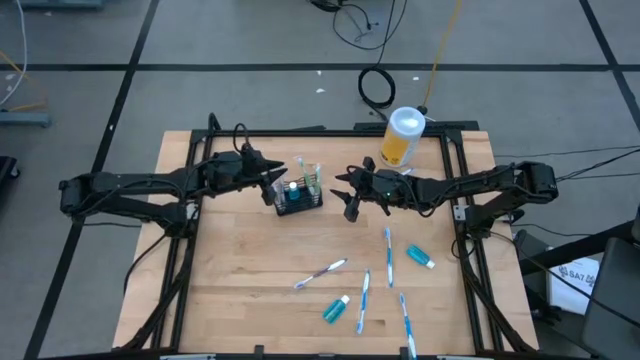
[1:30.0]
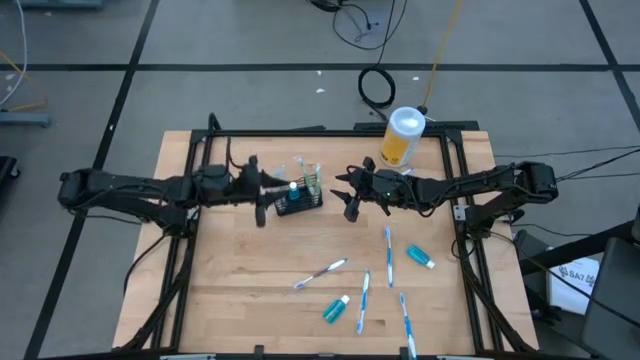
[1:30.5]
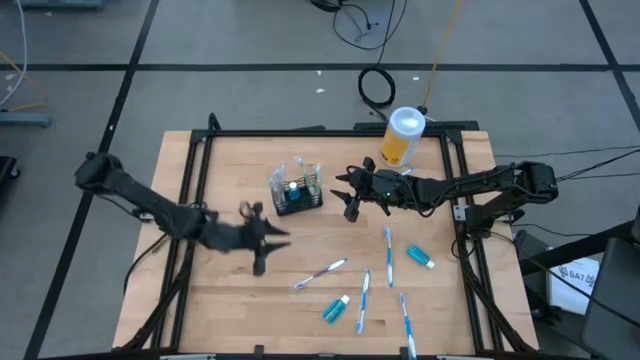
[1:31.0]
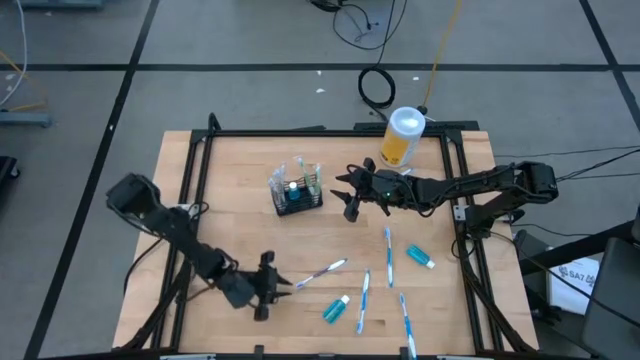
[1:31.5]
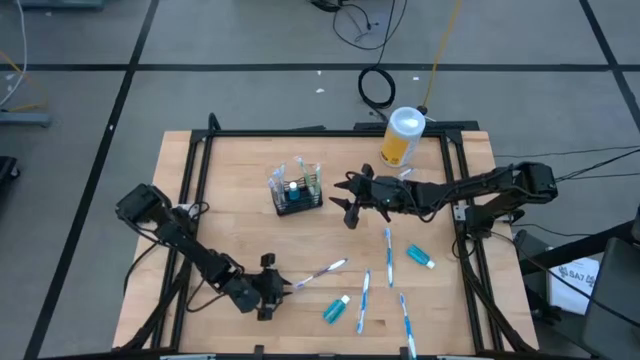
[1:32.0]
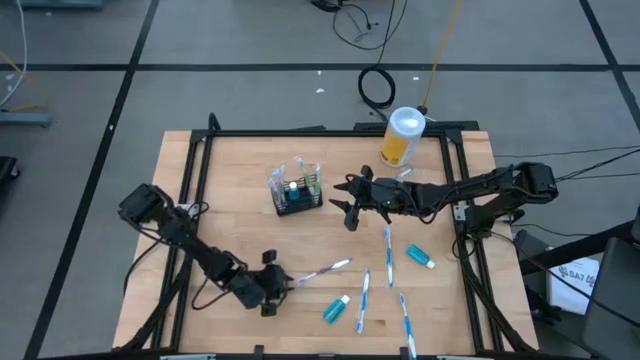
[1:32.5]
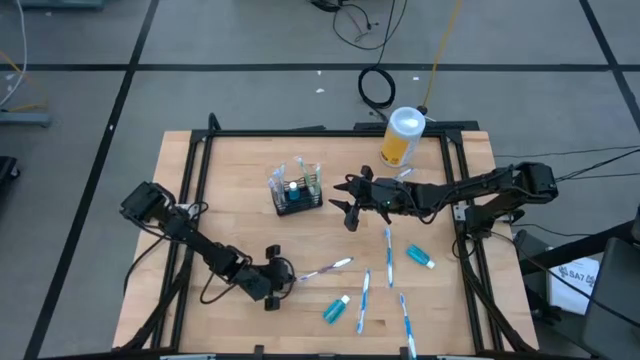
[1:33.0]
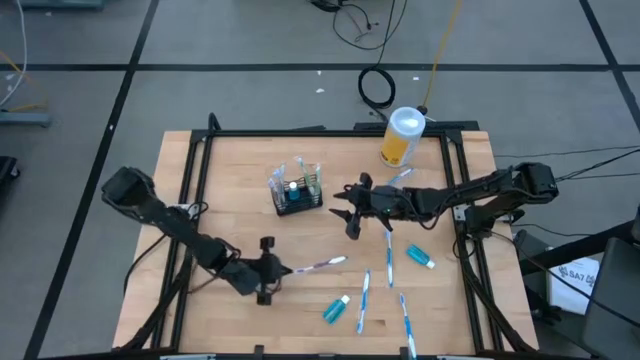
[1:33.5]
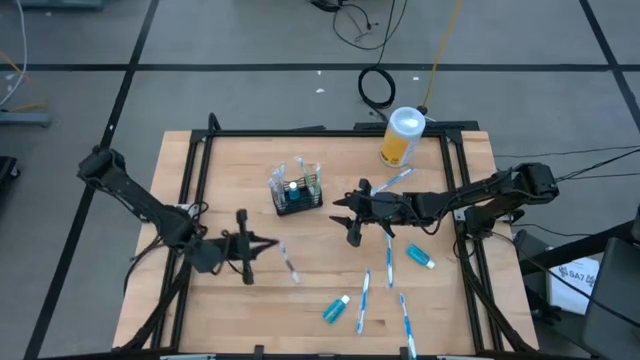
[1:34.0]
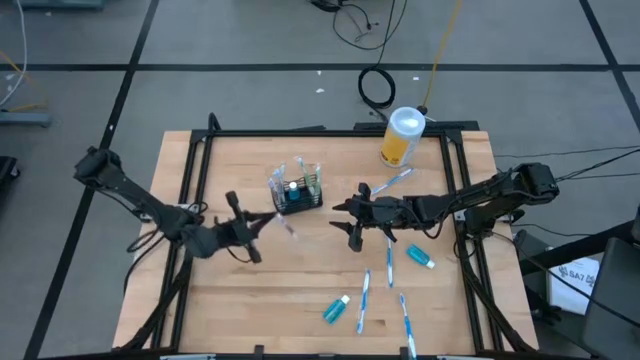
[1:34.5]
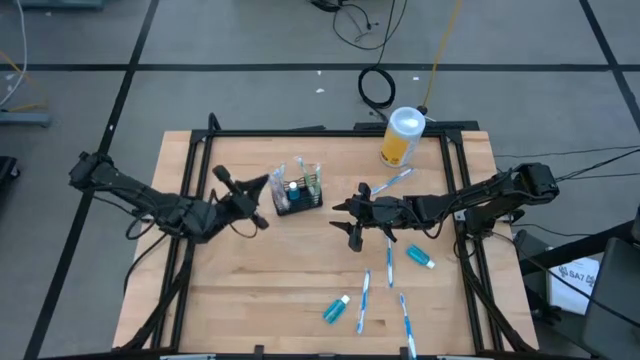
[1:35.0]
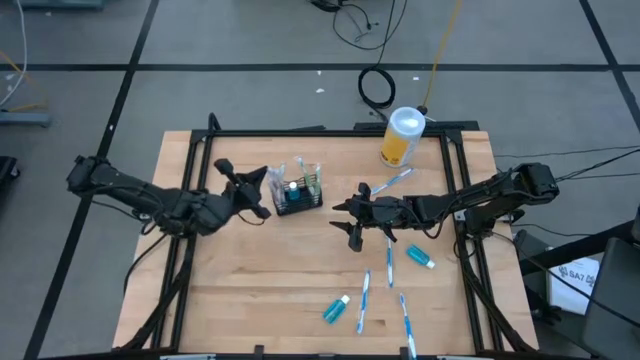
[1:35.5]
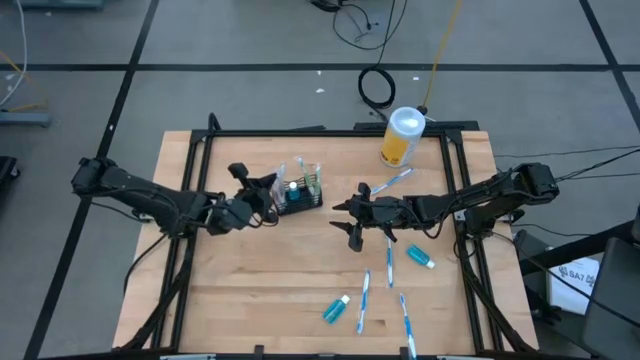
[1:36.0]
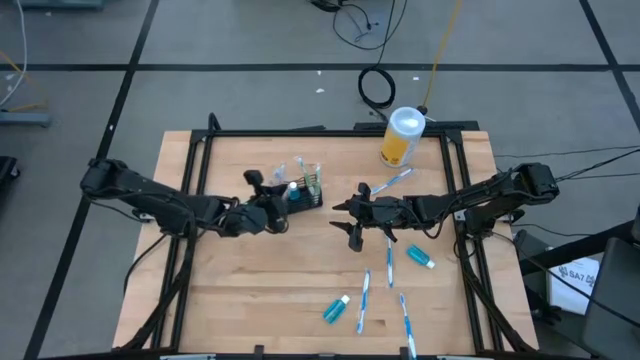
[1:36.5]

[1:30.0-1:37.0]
Task: Pick & Place toothbrushing station
Put the violet toothbrush into the black mesh organizer

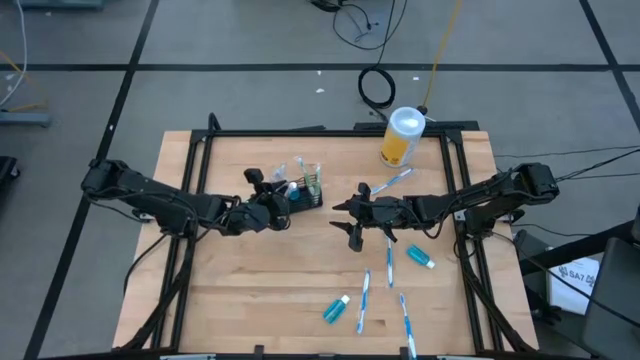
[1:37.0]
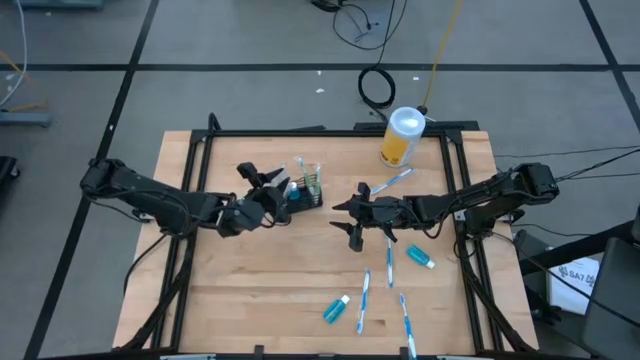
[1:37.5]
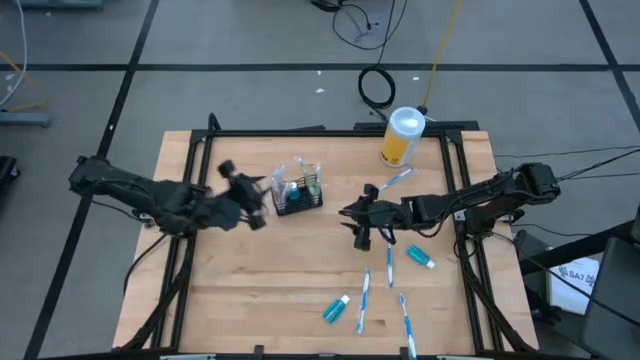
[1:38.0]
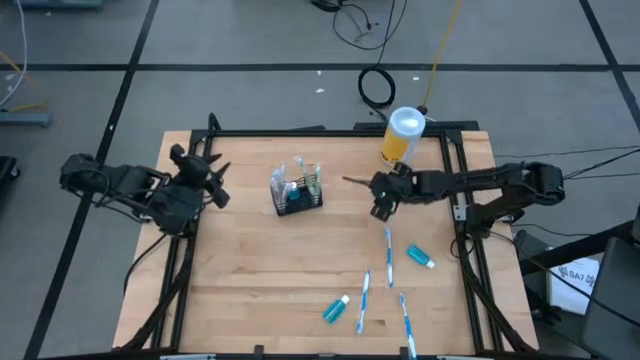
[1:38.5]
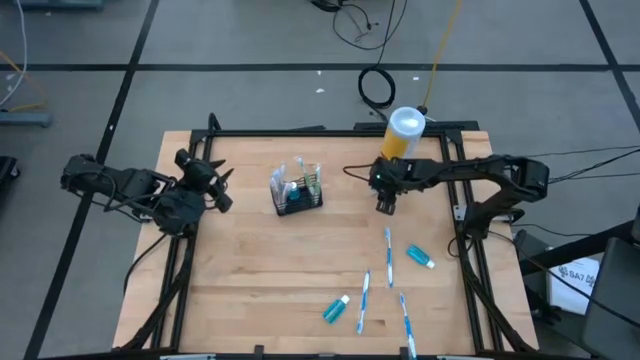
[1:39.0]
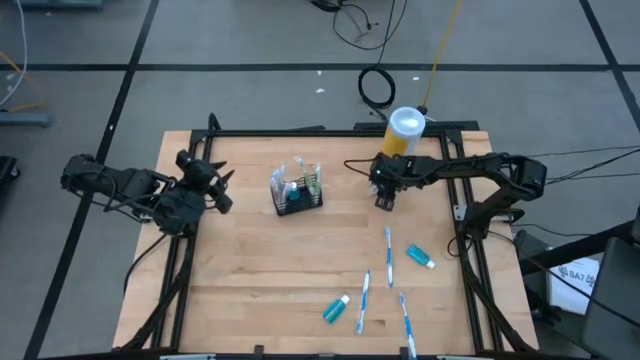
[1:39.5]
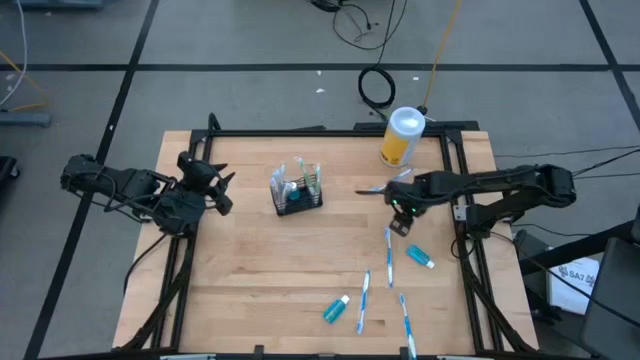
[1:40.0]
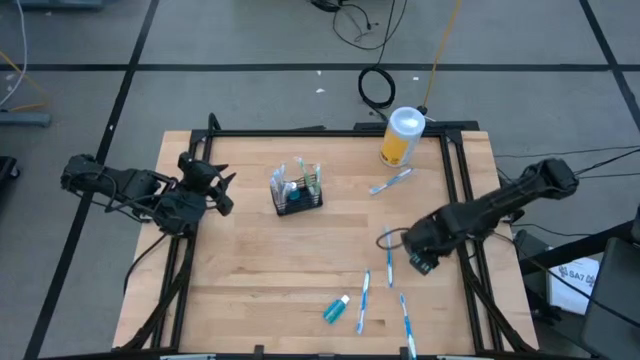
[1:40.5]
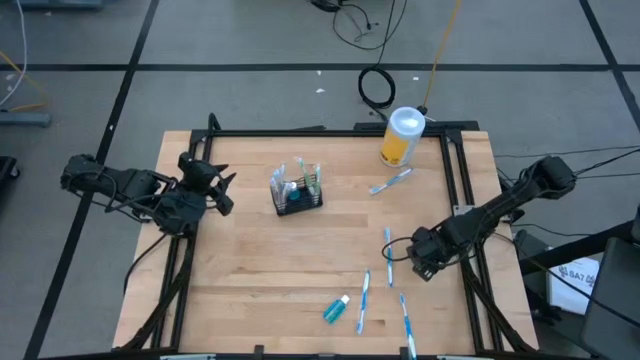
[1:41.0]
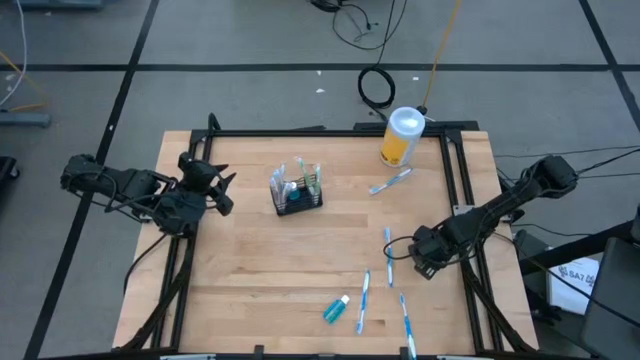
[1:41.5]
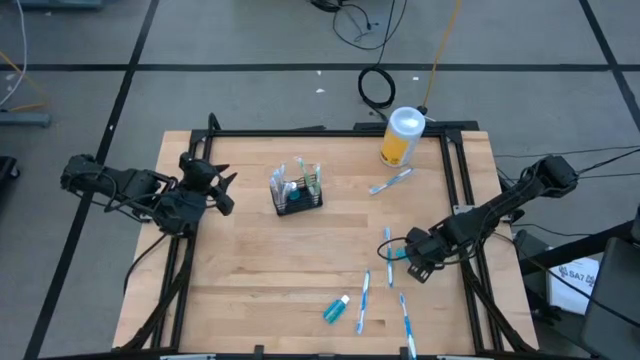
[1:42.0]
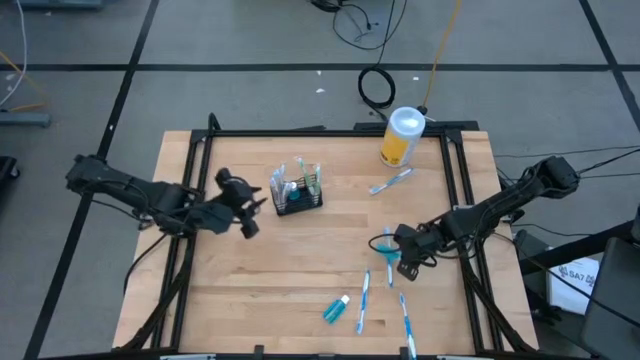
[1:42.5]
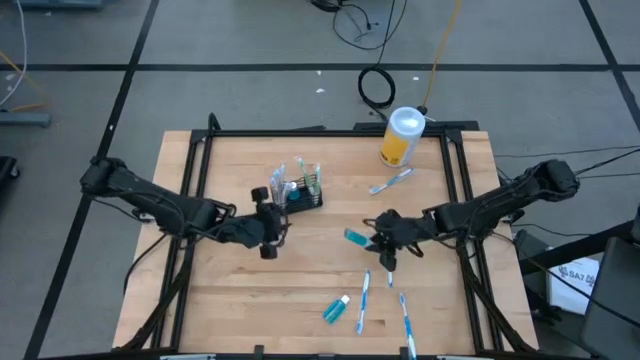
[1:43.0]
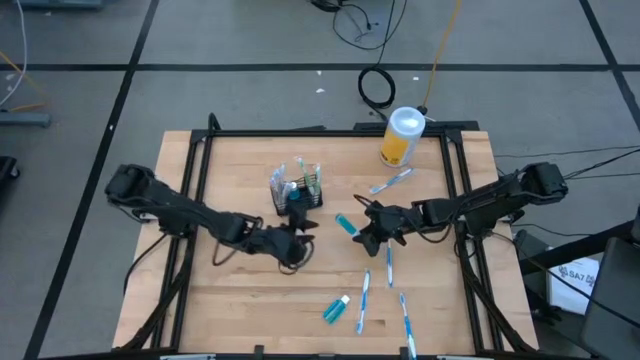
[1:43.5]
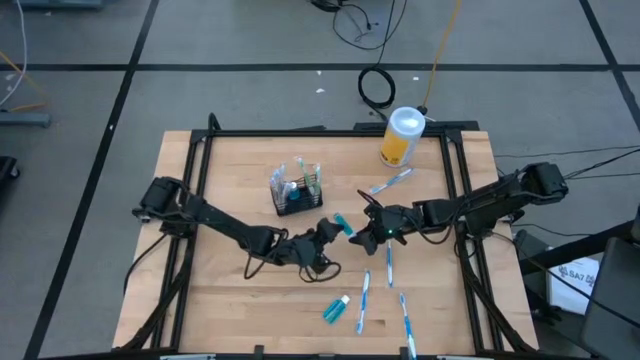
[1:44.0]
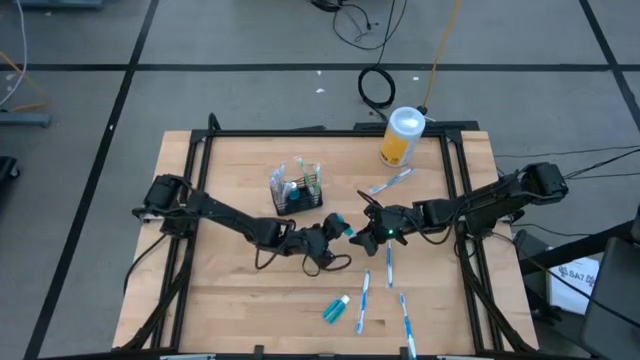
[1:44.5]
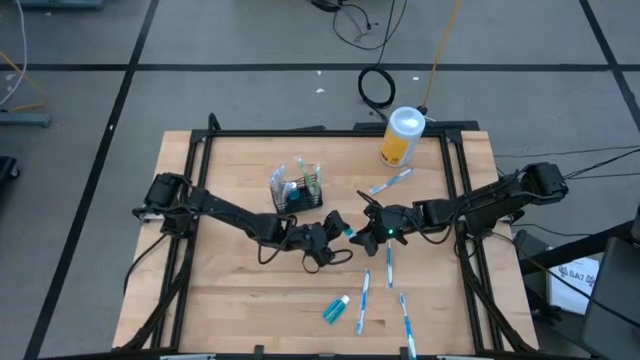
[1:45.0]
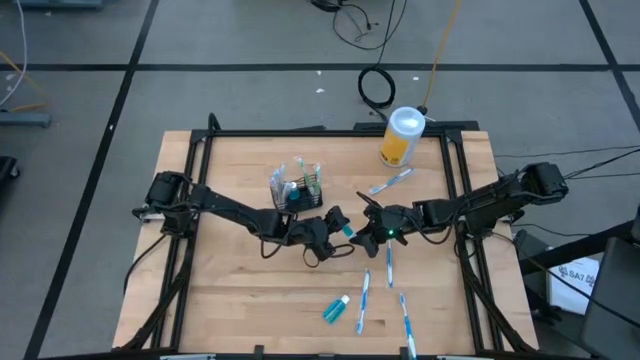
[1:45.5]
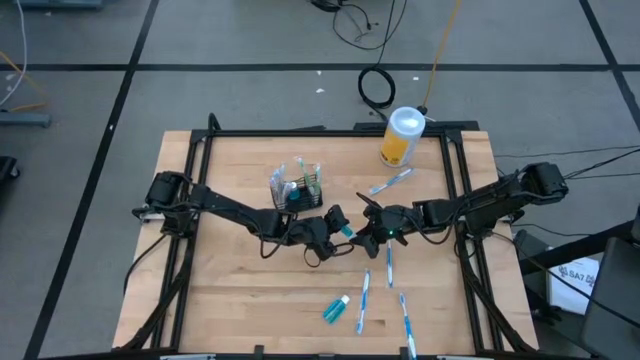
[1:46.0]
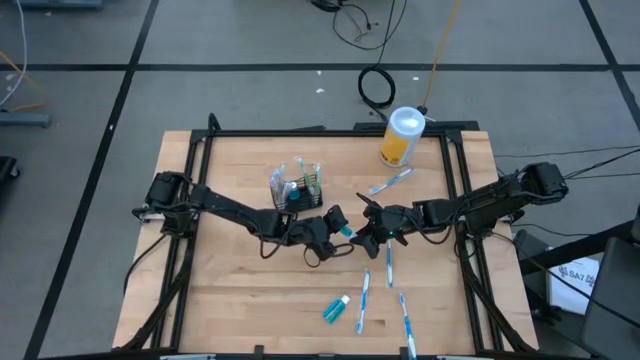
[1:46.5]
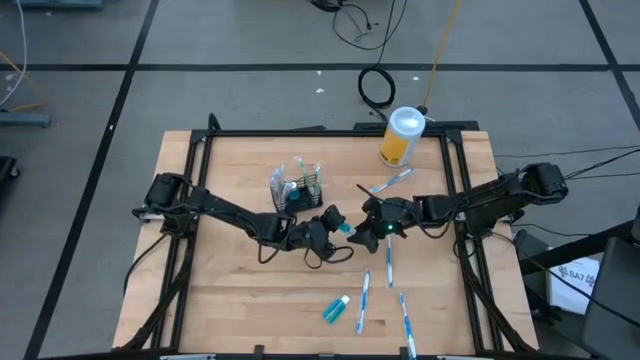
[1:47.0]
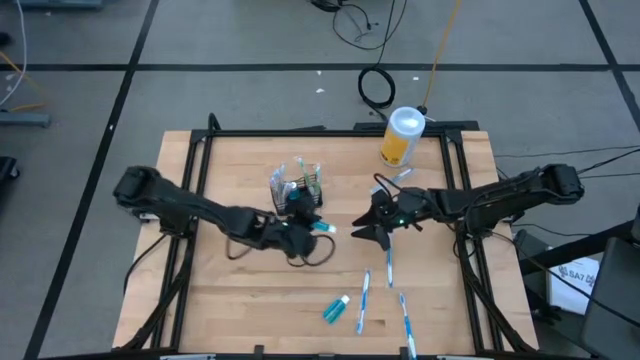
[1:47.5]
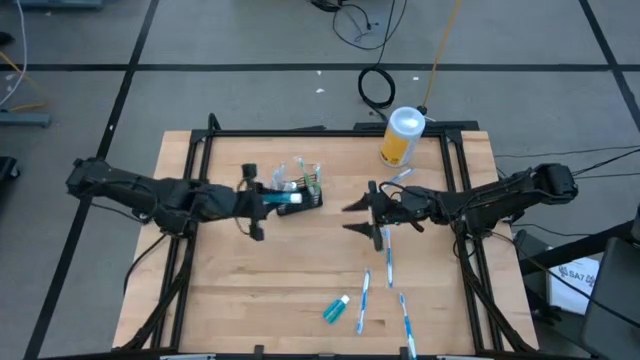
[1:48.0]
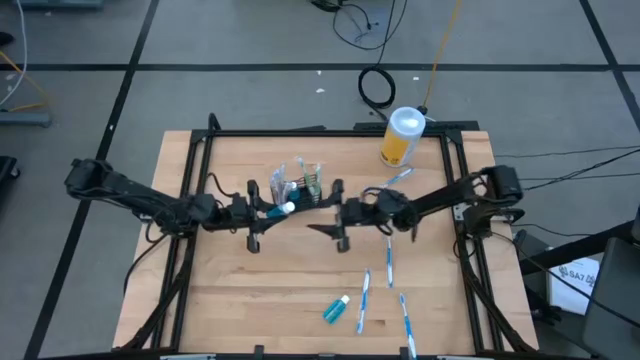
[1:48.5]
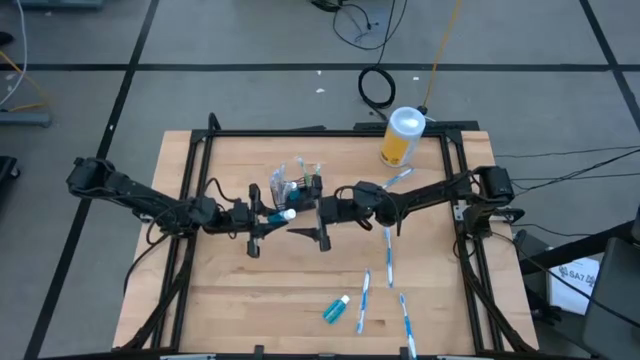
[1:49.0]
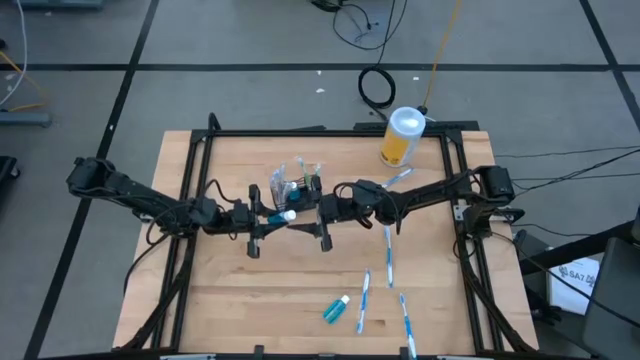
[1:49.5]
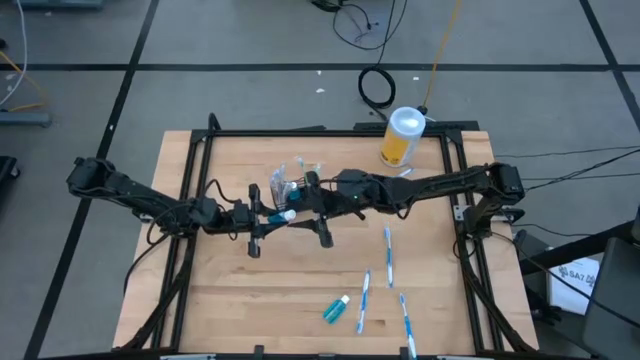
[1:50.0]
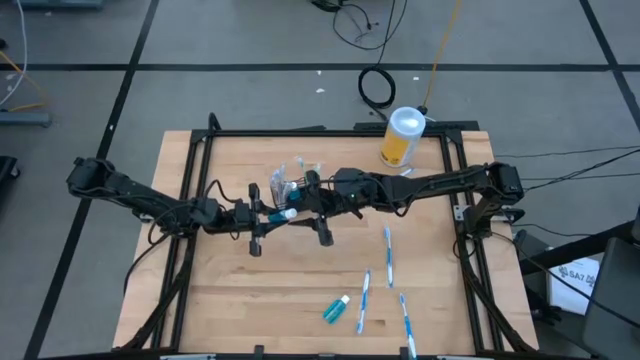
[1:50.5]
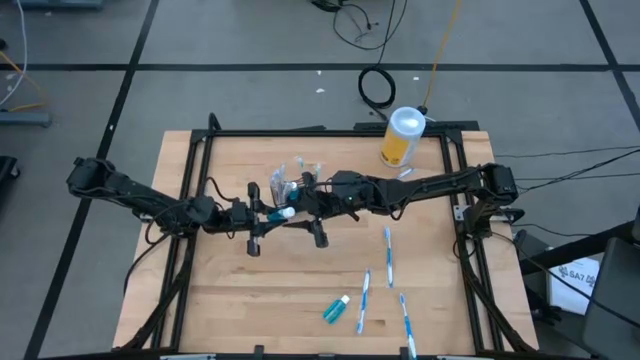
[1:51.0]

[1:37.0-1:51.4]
Put the the top blue mouthwash into the black mesh organizer

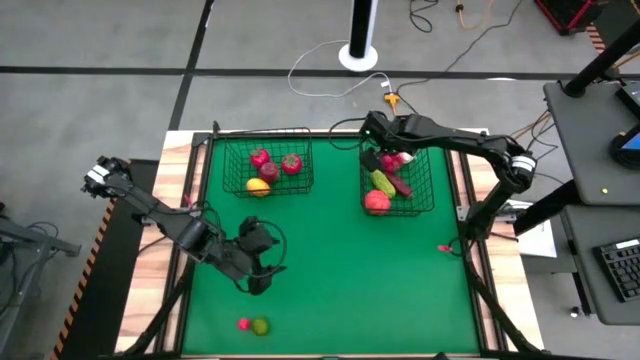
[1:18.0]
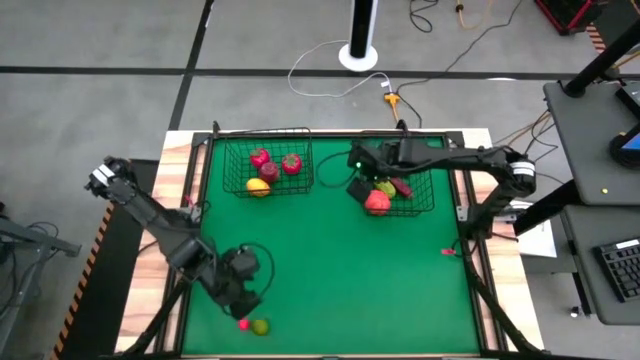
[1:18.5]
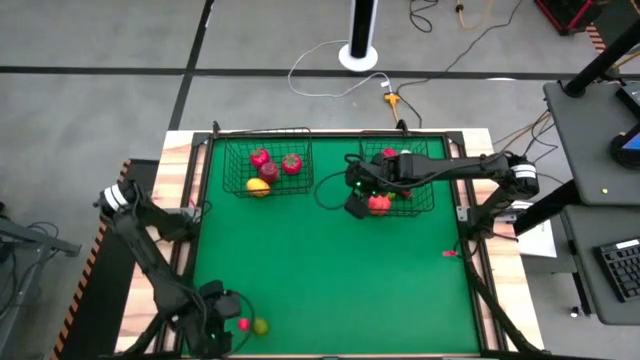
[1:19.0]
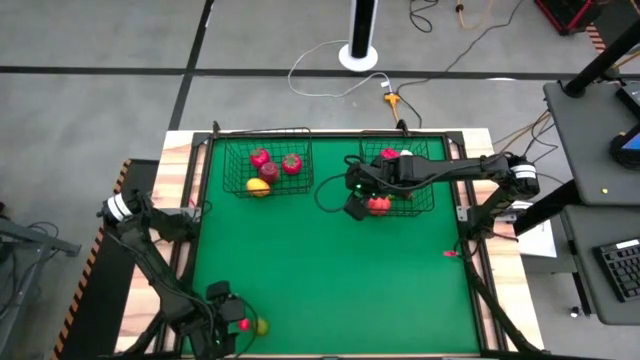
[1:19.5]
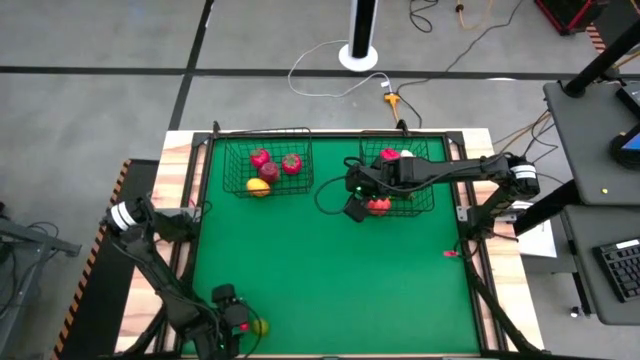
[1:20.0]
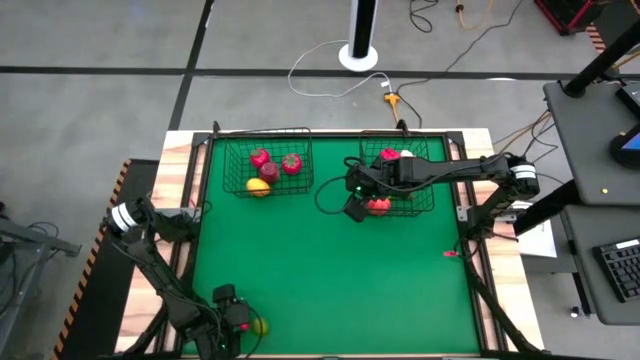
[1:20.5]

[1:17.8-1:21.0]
Task: Sort produce into baskets
Put the red strawberry into the left wire basket
